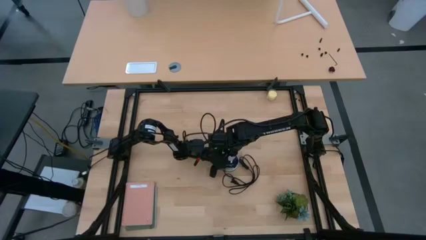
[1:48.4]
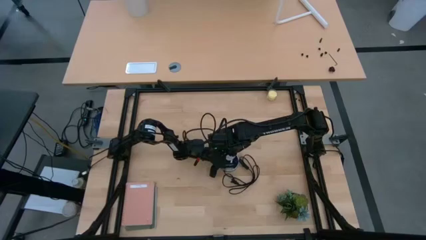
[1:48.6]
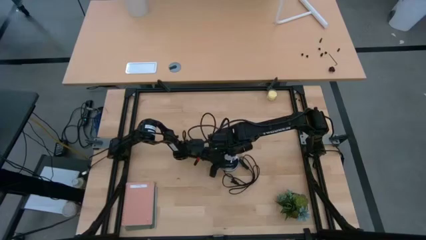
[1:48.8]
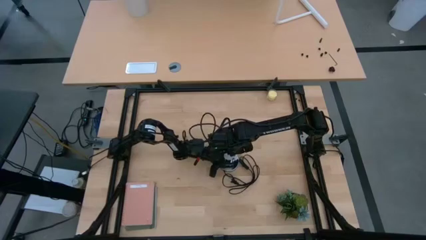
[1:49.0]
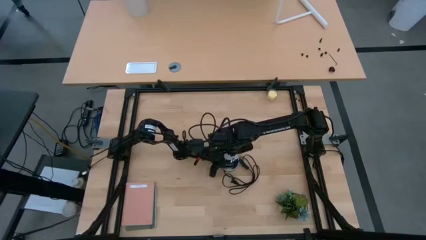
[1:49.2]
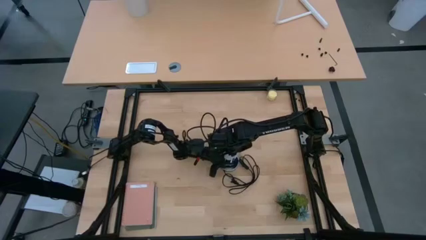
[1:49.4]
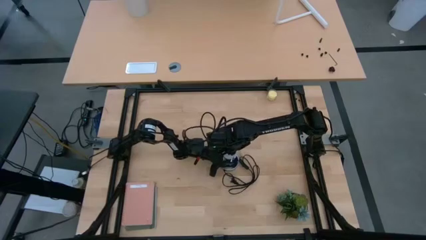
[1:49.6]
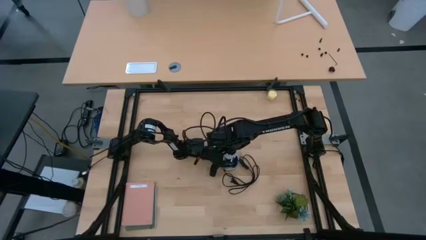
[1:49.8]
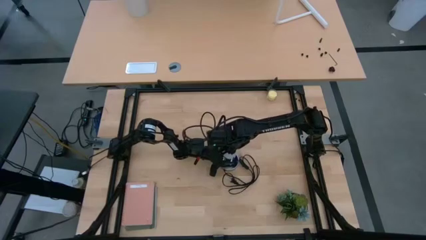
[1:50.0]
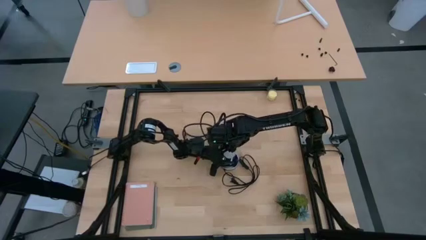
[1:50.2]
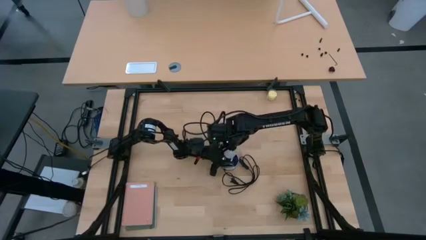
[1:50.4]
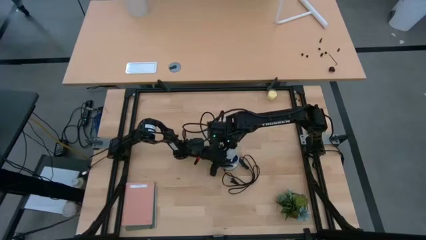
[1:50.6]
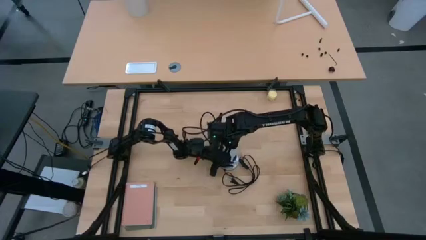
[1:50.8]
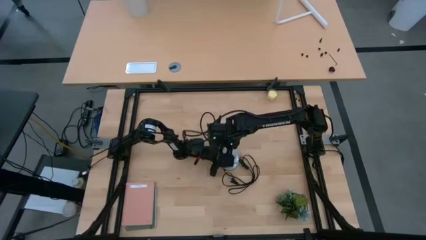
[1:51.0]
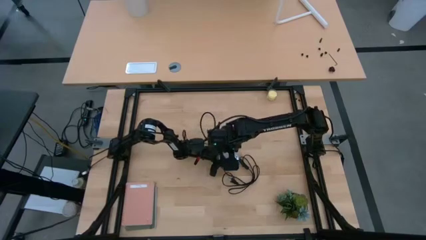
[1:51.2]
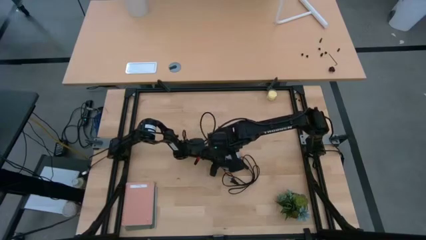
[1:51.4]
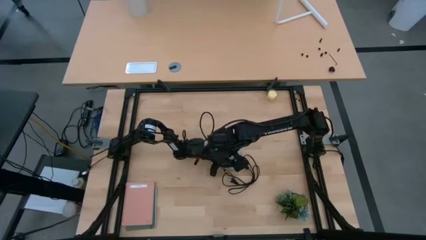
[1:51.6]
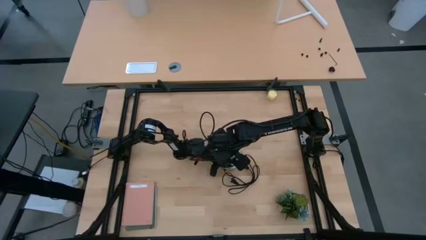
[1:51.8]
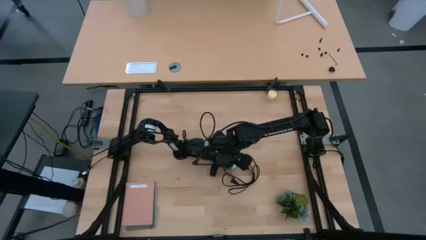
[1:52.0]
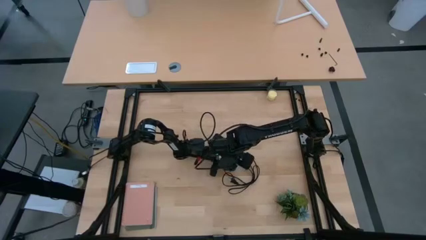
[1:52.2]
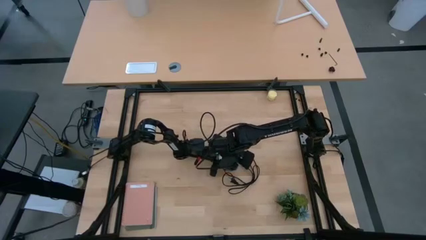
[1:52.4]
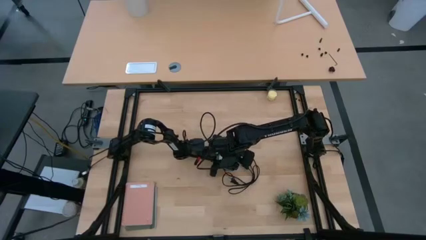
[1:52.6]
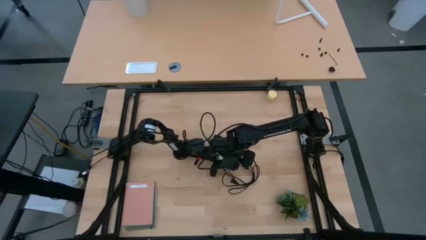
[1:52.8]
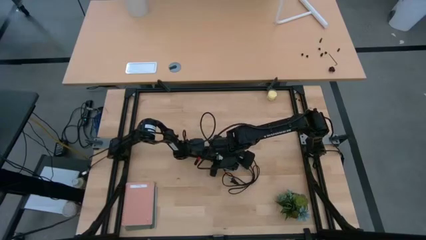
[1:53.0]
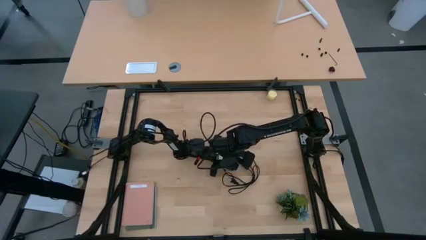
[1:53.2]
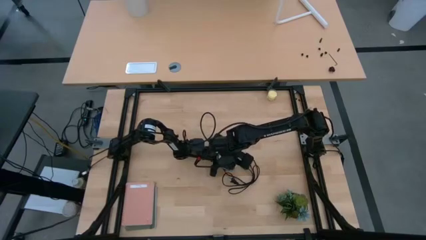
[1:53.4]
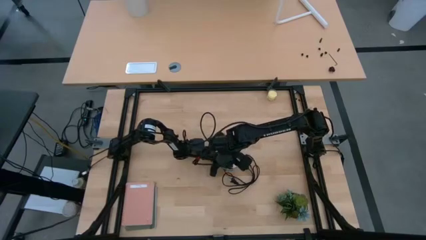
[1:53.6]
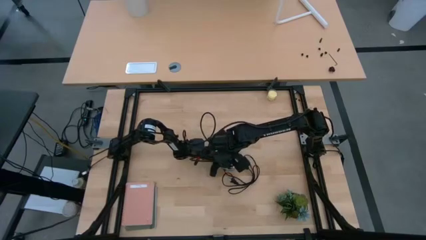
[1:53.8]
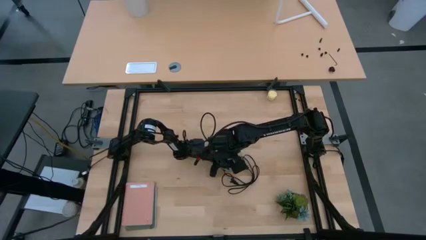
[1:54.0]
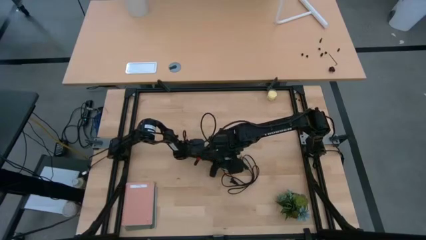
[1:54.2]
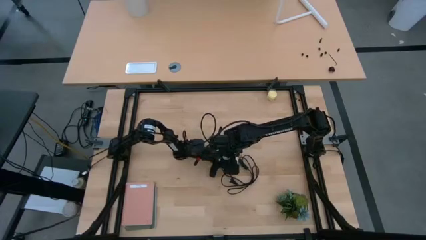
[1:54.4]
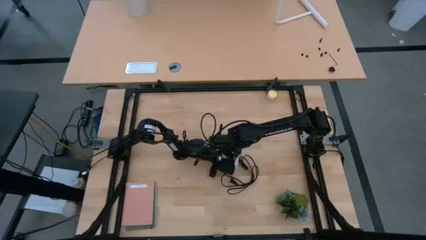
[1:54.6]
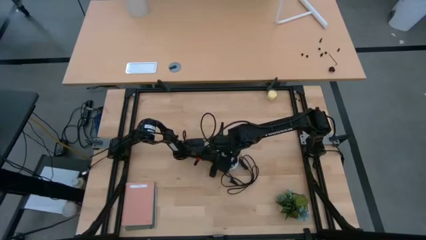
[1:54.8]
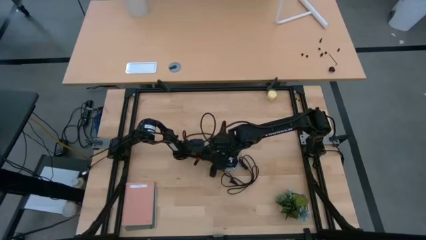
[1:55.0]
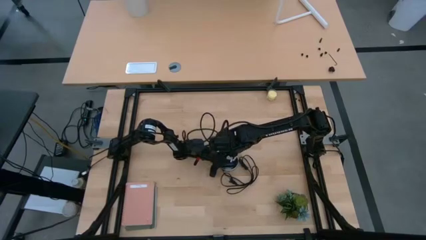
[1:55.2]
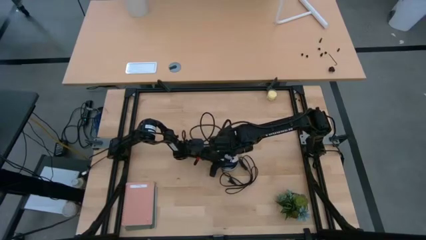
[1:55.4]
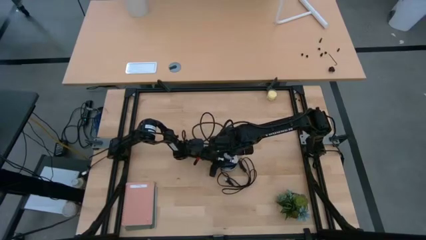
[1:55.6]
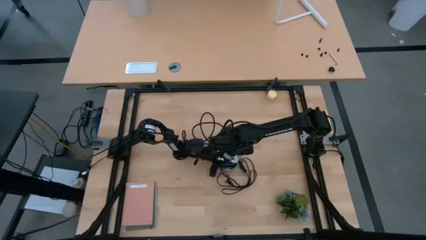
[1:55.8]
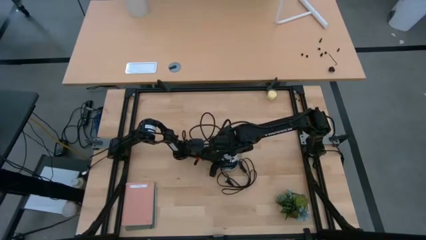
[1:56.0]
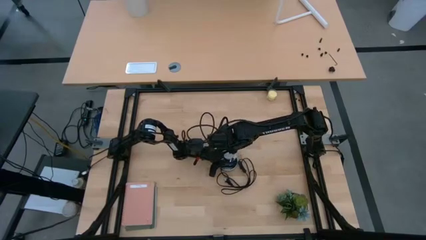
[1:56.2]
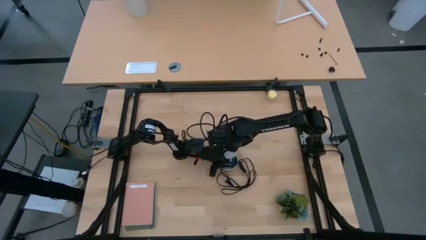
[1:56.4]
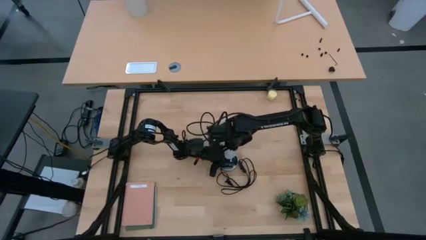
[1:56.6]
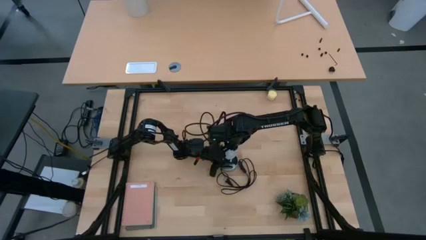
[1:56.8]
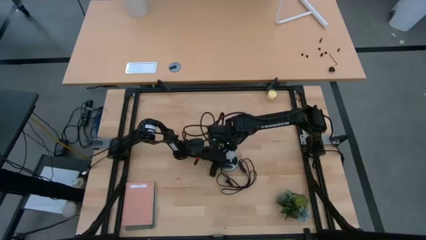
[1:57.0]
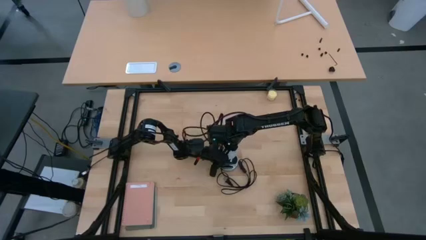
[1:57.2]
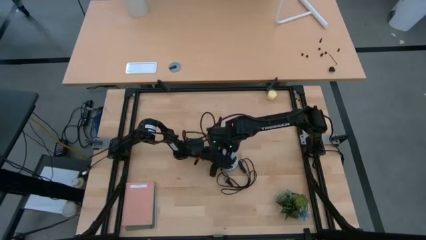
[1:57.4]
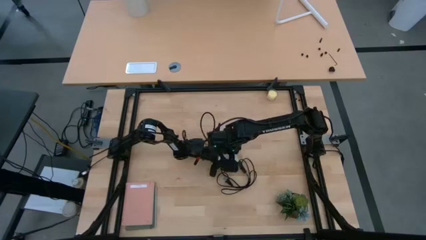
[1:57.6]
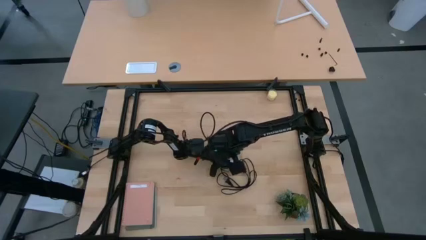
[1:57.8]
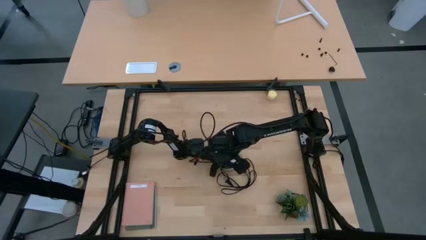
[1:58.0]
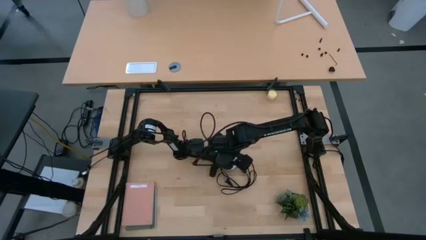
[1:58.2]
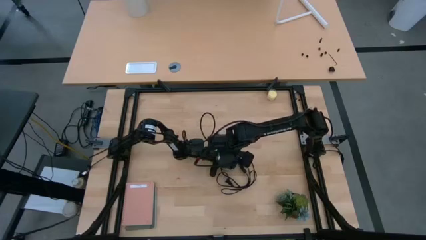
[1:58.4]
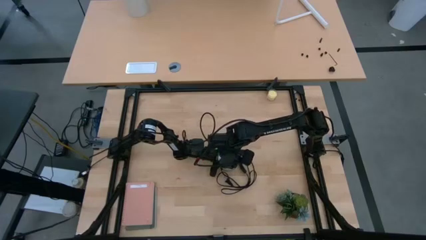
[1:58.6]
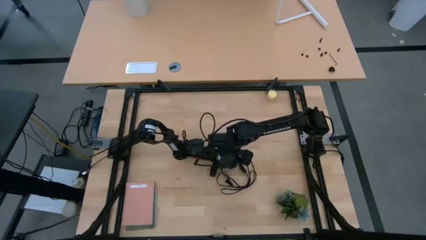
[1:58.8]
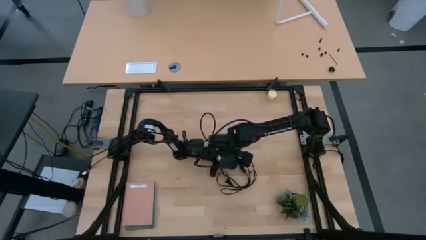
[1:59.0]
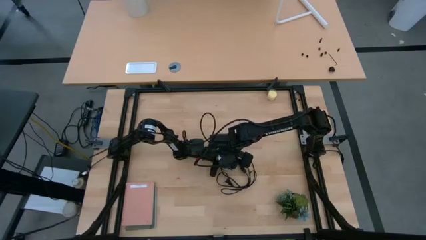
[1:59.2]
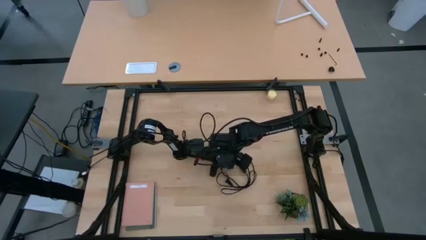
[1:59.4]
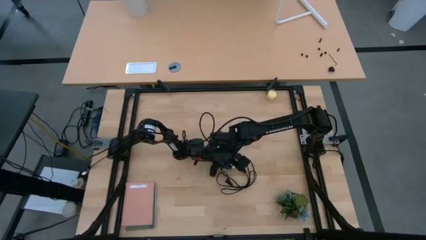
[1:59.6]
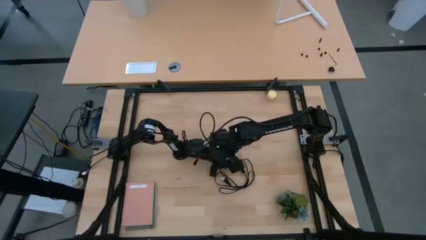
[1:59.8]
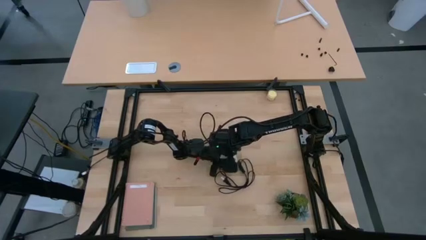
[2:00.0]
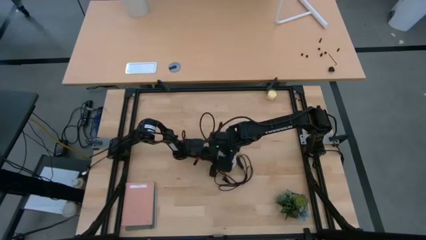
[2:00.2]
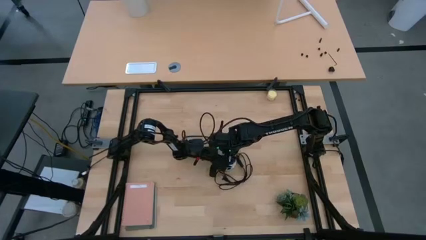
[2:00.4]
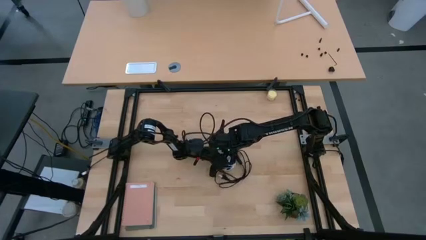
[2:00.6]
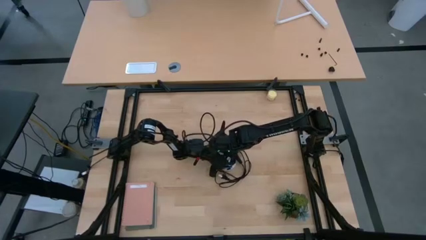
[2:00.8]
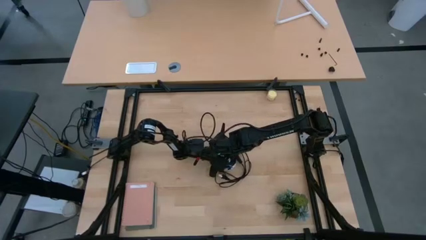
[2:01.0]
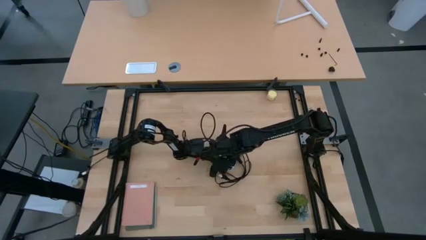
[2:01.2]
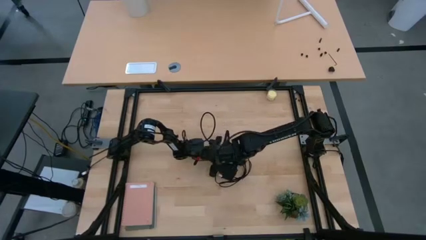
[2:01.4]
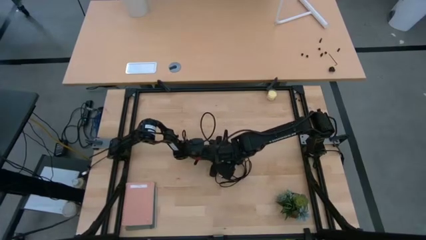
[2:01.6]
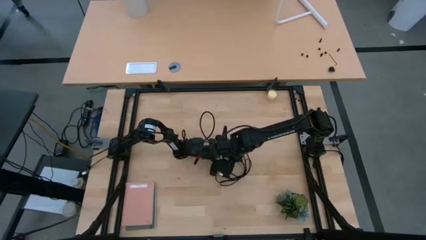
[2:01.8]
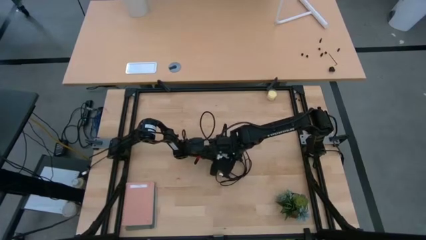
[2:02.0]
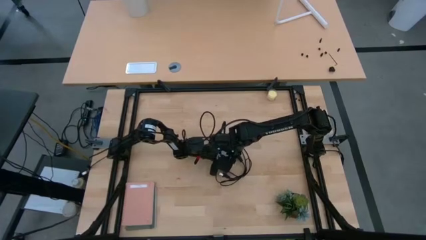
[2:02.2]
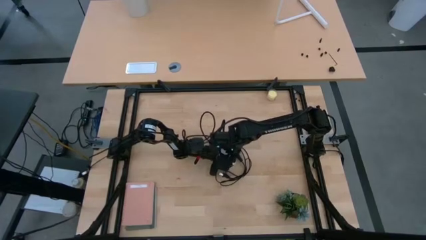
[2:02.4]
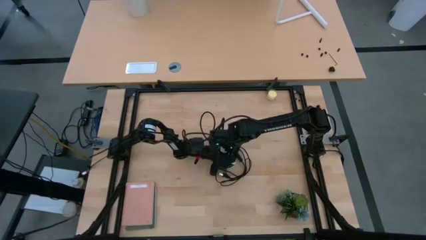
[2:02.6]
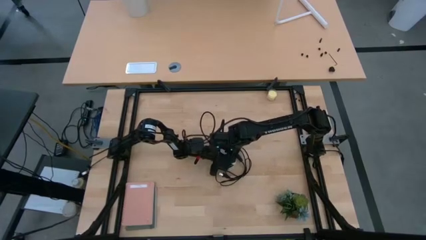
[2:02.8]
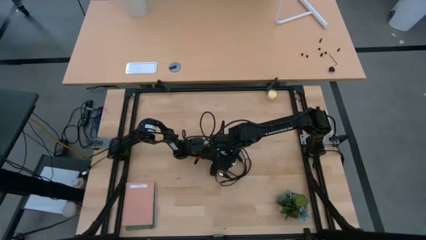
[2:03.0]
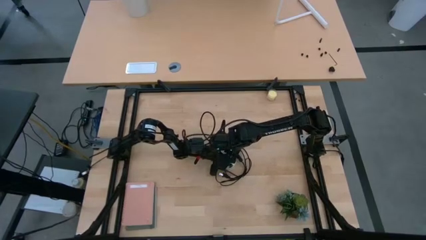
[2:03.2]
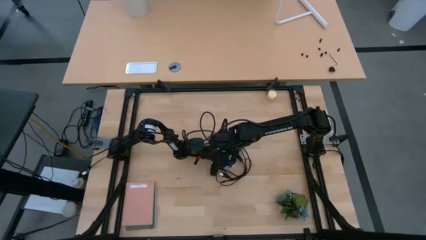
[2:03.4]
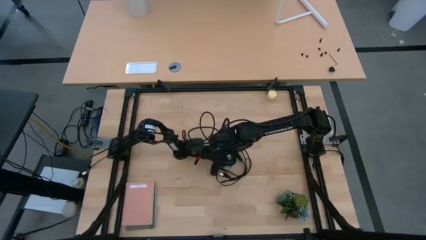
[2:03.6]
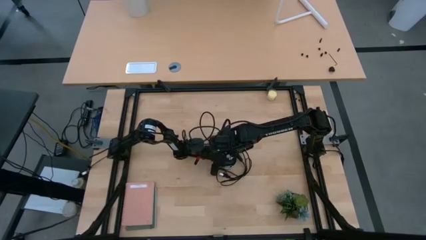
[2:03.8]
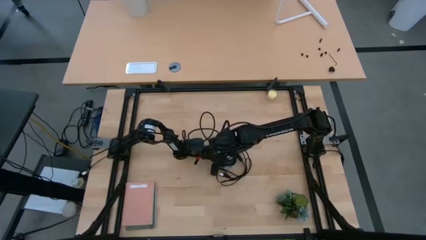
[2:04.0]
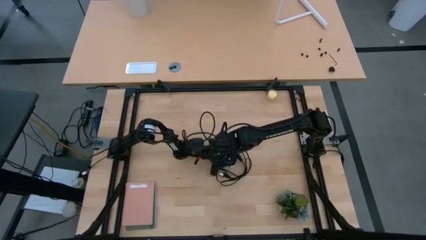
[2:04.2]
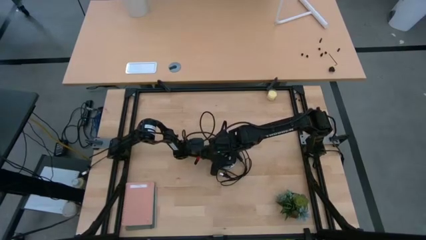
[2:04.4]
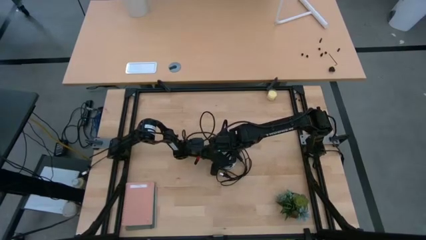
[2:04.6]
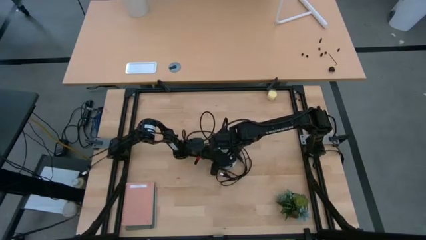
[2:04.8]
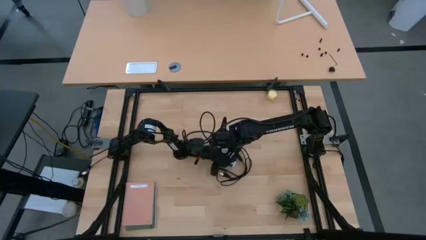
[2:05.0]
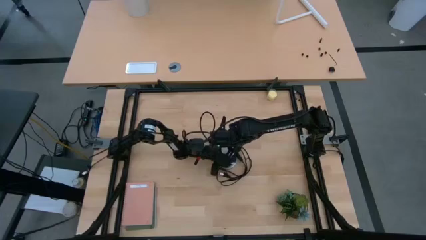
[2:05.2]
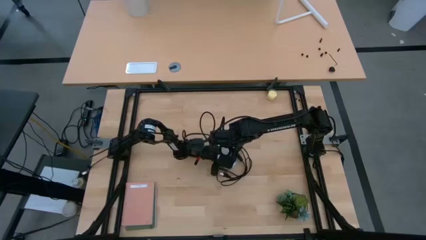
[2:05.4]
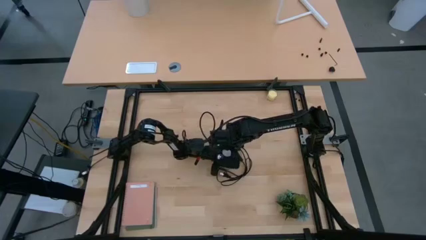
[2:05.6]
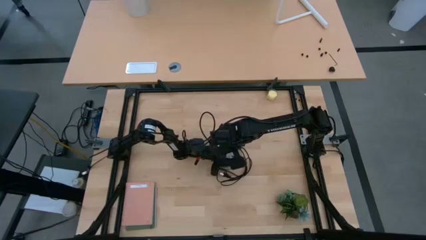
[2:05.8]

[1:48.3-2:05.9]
Task: Screw lightbulb
Insert the white lightbulb into the silver lamp
